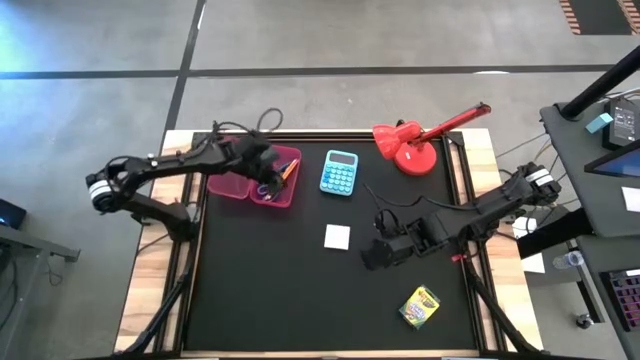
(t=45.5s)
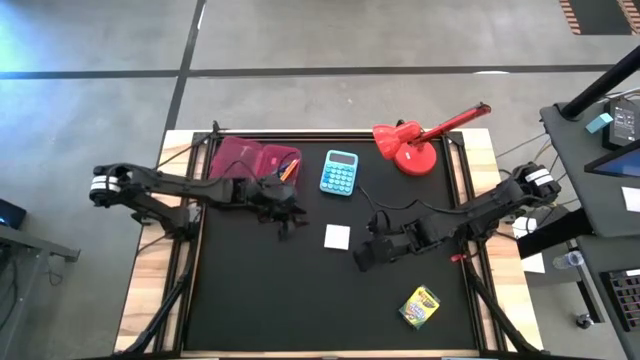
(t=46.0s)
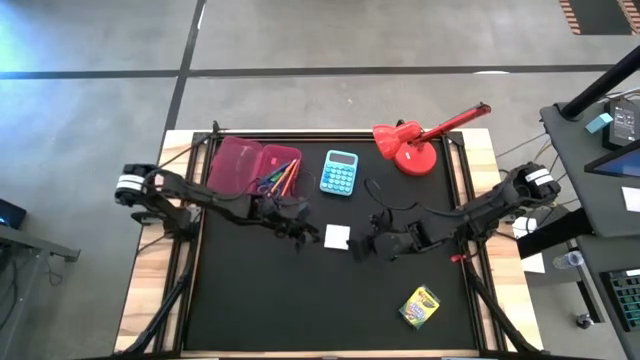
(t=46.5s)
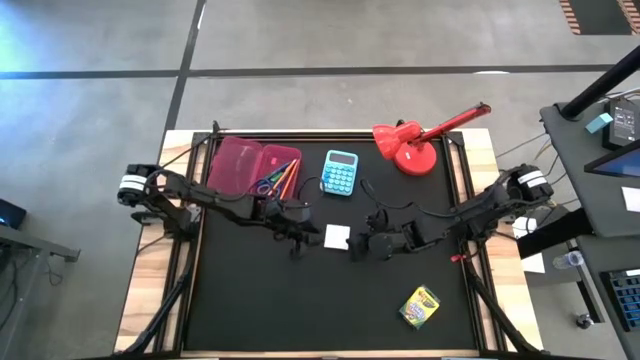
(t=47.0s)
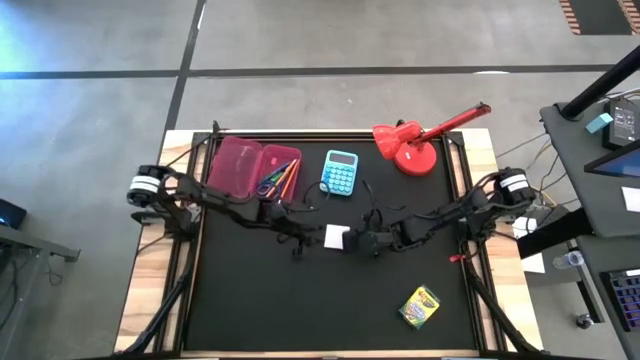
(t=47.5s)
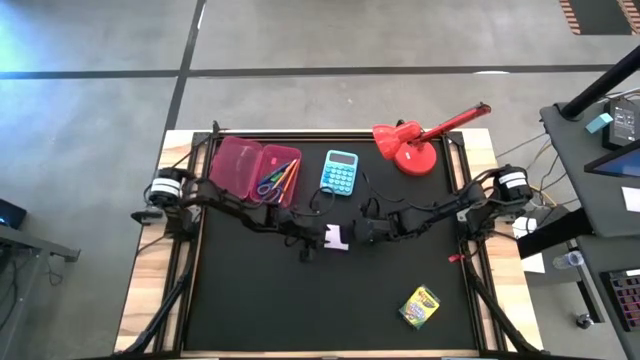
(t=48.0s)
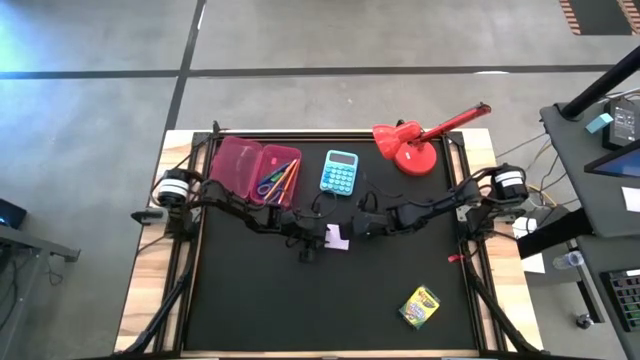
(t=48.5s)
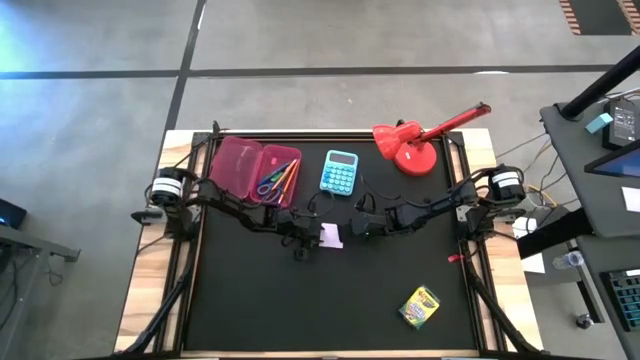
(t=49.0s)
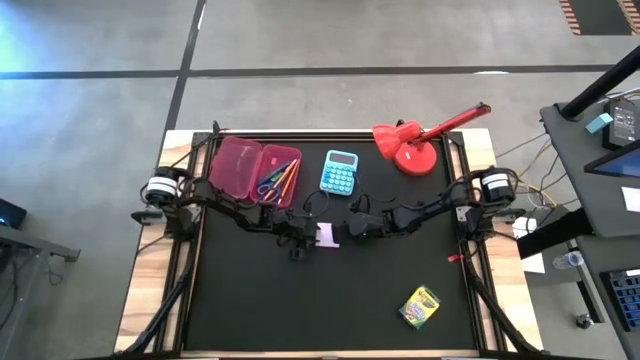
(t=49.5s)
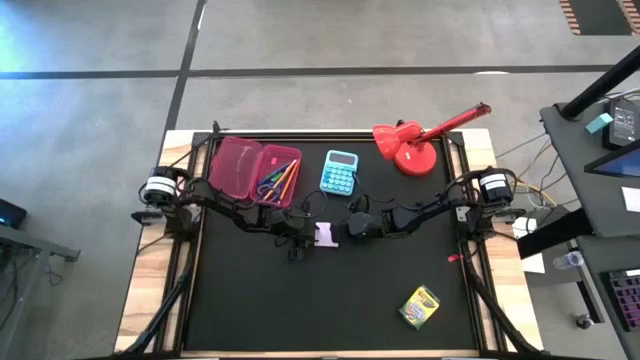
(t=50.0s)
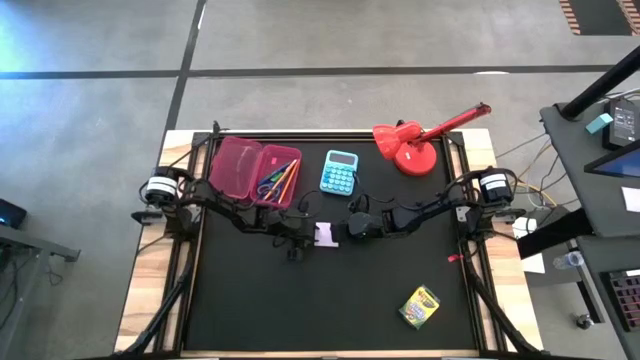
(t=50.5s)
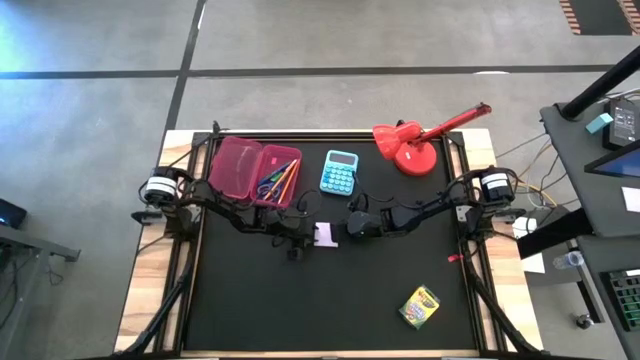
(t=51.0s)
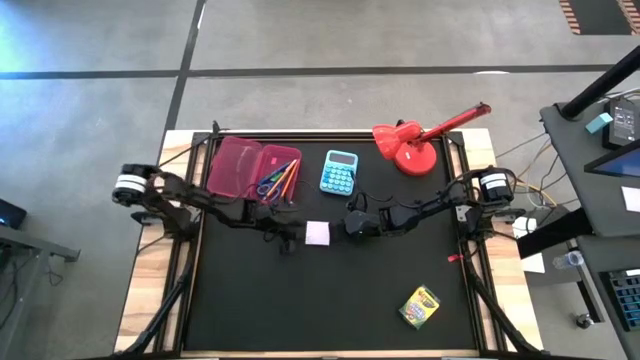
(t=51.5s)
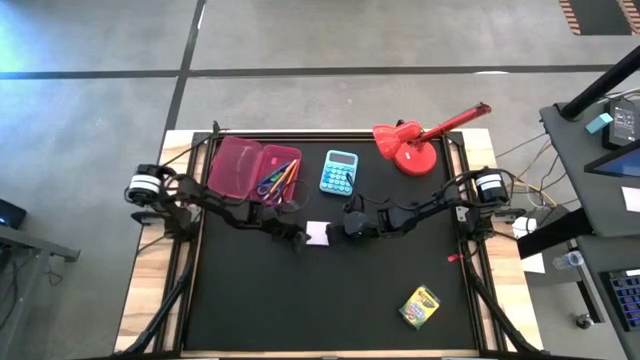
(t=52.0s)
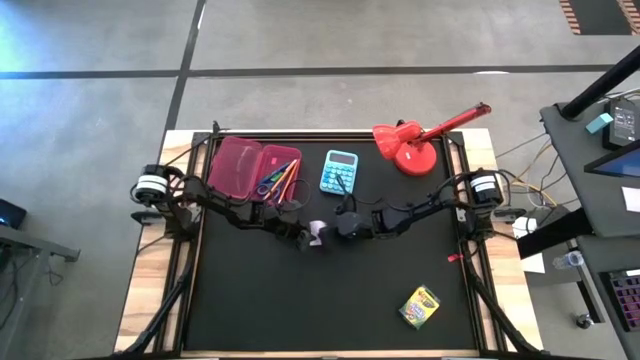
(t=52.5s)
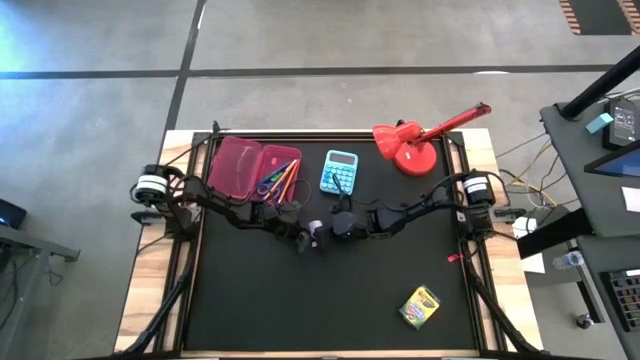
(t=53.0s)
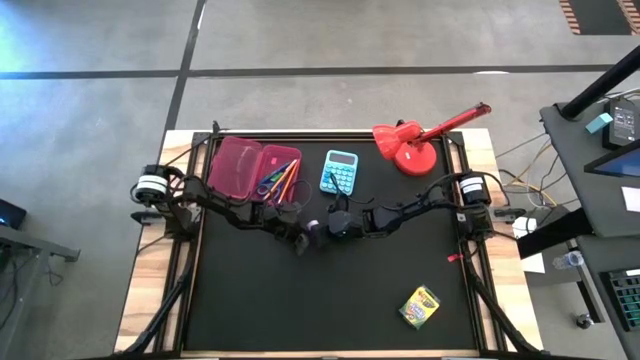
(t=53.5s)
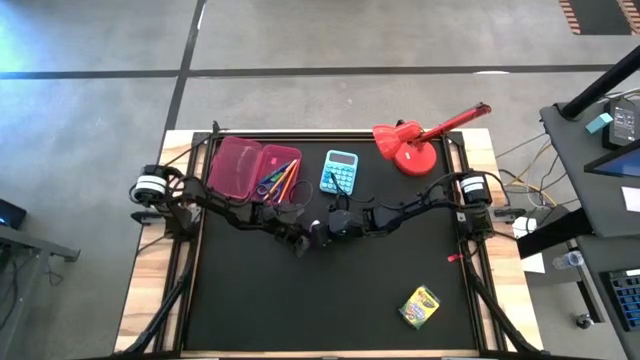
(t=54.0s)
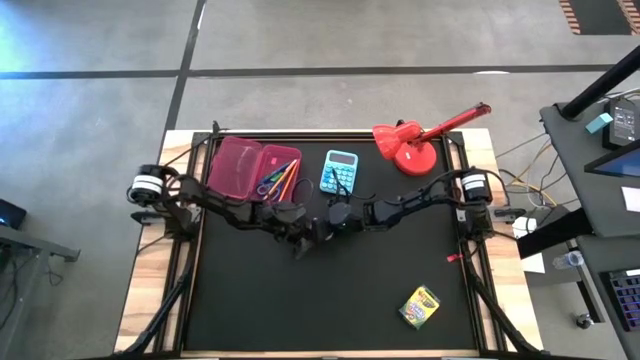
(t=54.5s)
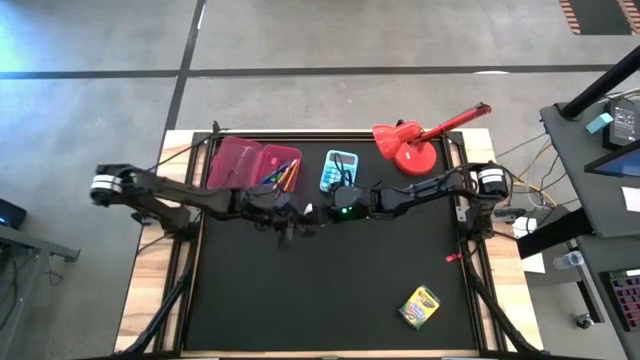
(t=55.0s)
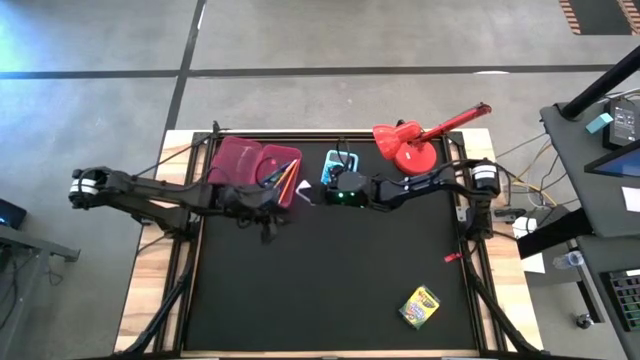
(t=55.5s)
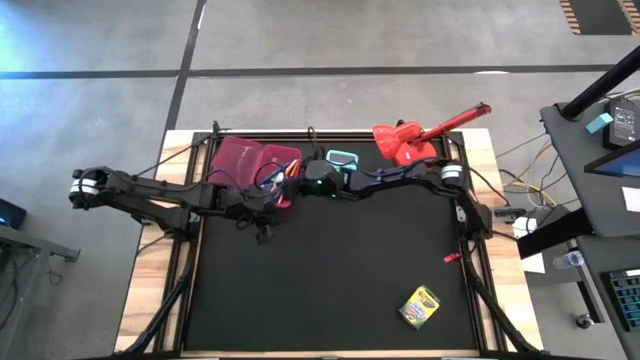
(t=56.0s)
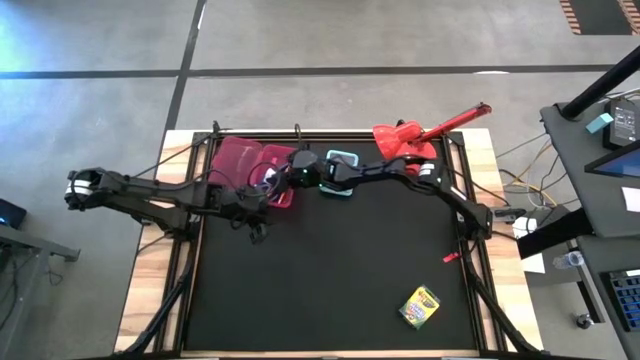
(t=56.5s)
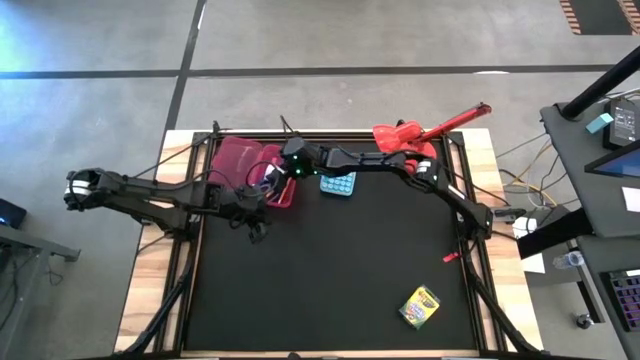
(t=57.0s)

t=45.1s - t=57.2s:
Task: Pack school essentials
Put the pink sticky notes into the pink supply box

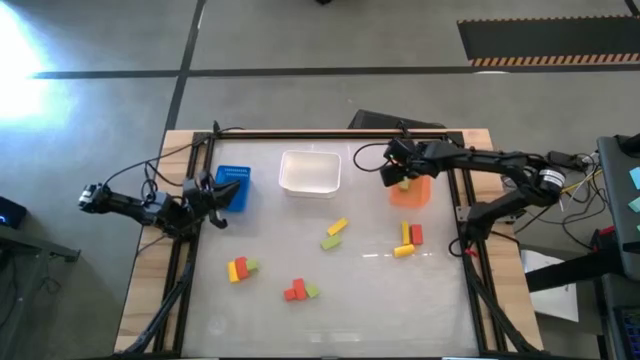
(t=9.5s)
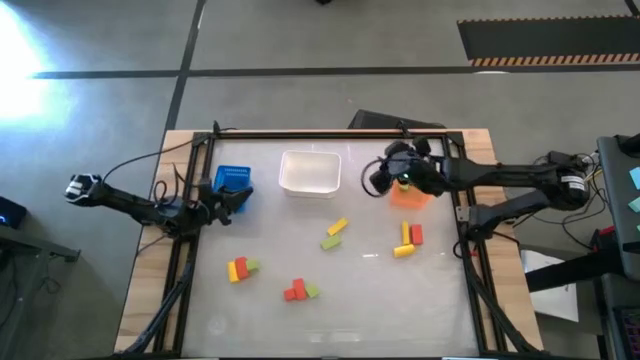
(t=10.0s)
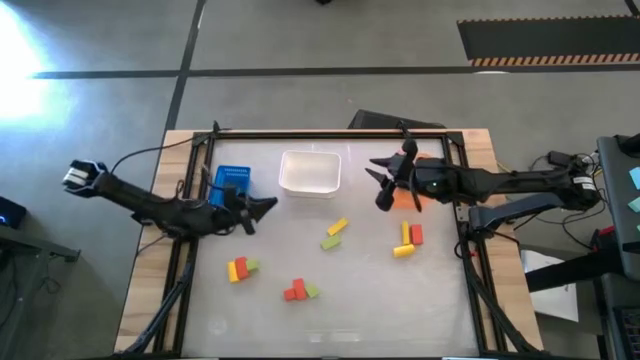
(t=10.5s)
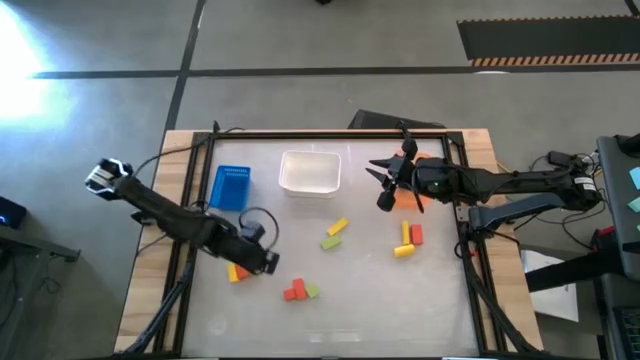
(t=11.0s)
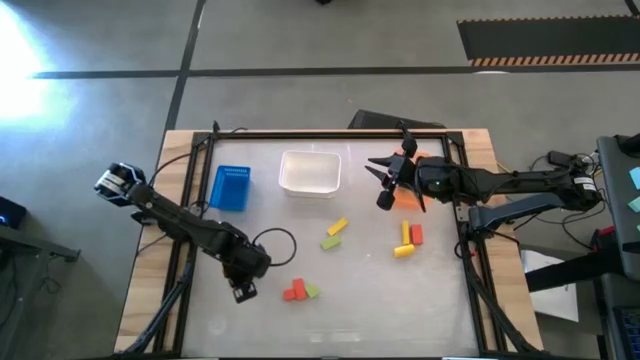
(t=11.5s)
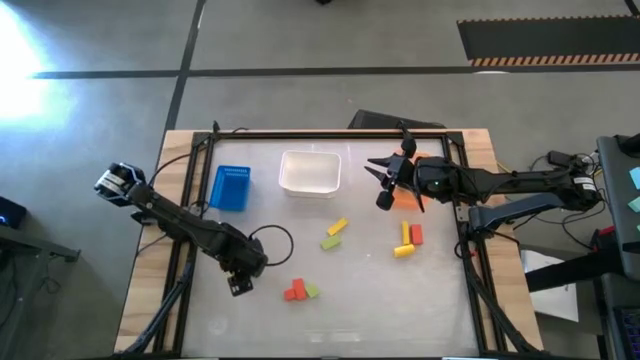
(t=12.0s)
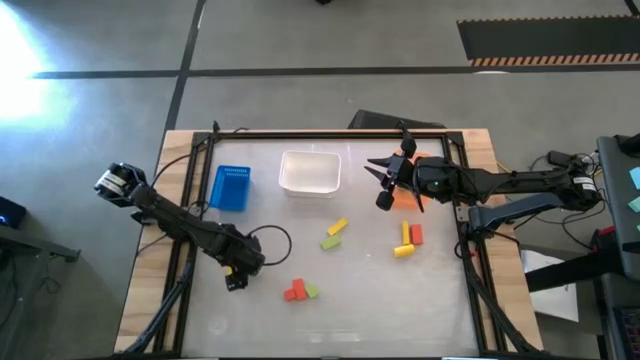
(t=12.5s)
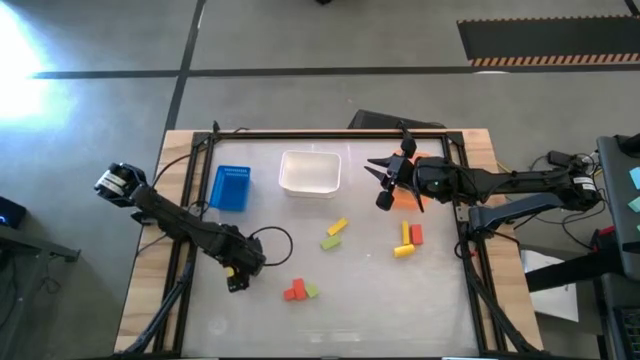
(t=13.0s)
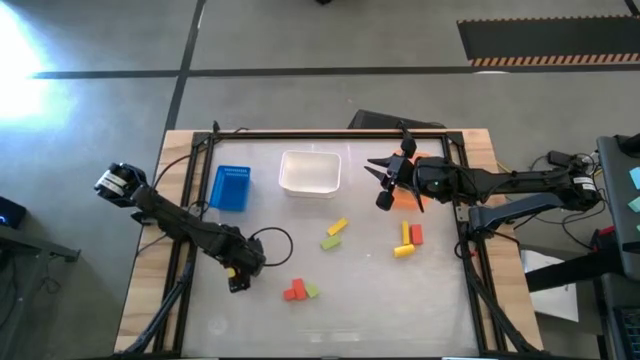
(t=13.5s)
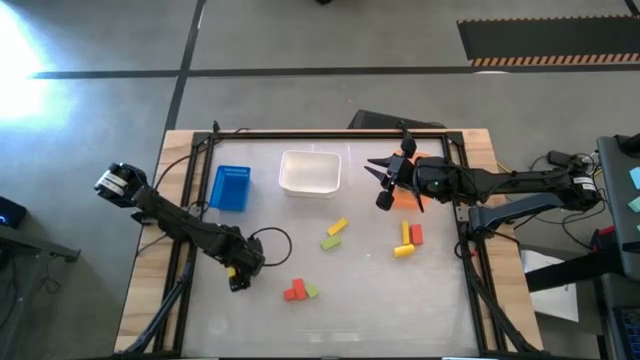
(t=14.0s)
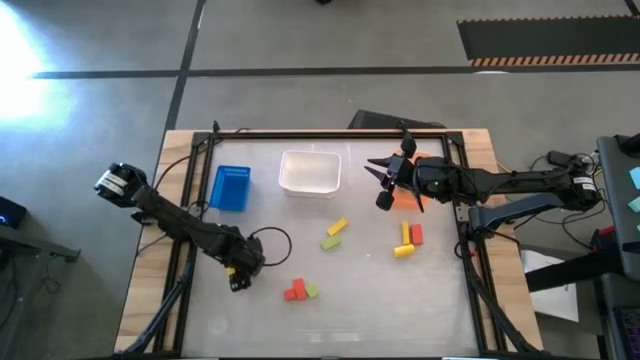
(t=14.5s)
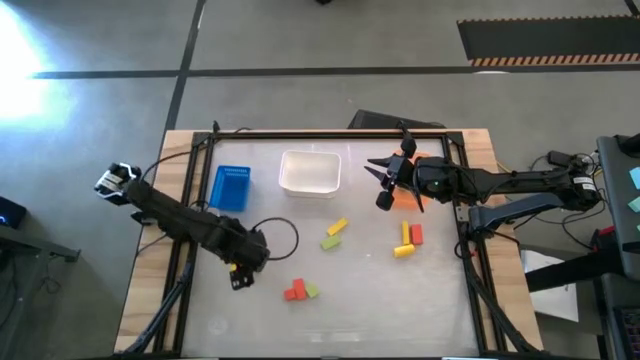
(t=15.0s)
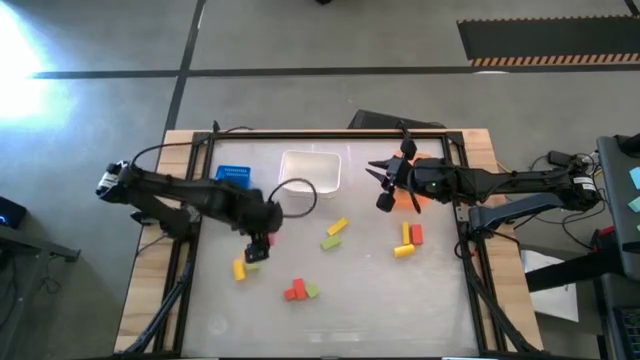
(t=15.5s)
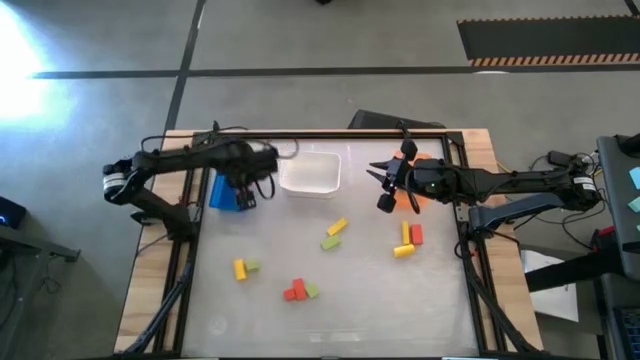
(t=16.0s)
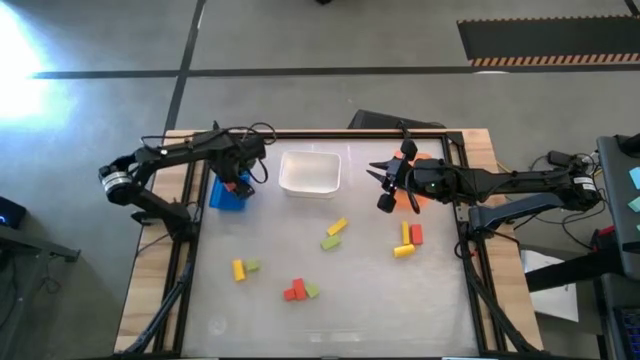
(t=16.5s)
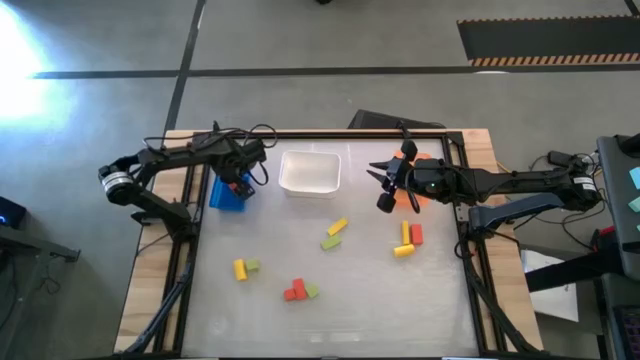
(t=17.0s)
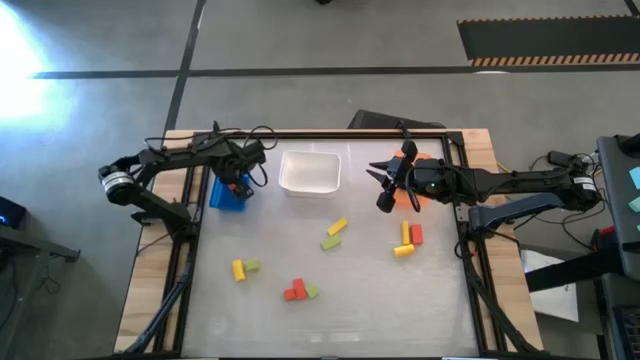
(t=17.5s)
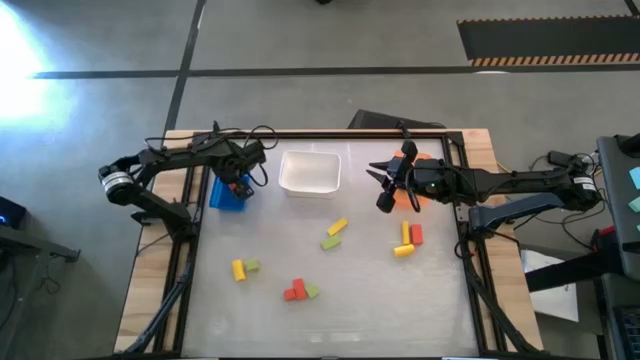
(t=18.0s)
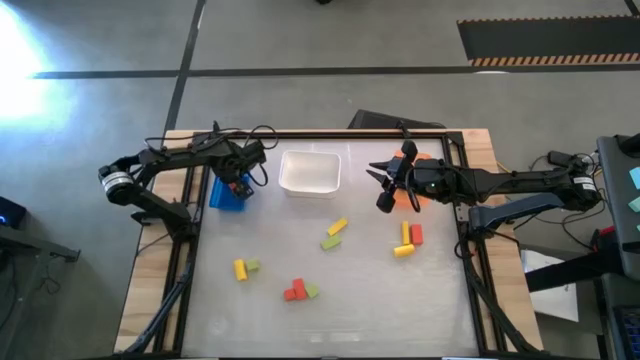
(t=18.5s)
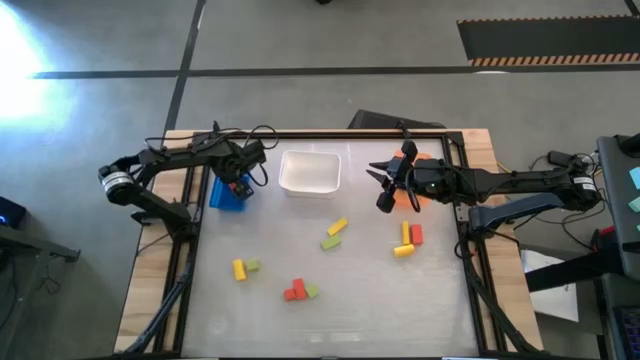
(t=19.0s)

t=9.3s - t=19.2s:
Task: Sort & place blocks by color
Put the top left orange block into the blue bin
